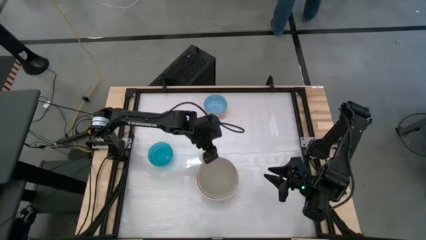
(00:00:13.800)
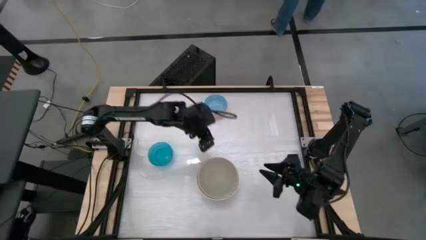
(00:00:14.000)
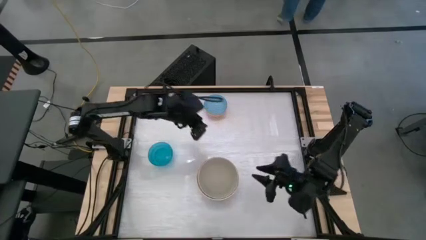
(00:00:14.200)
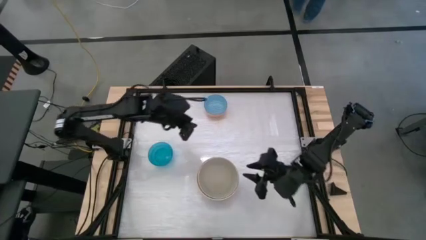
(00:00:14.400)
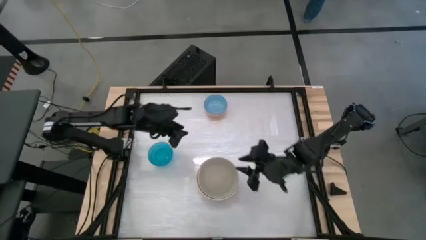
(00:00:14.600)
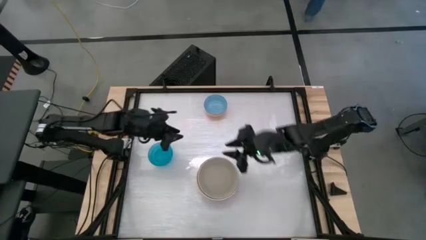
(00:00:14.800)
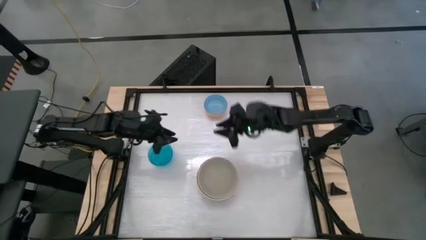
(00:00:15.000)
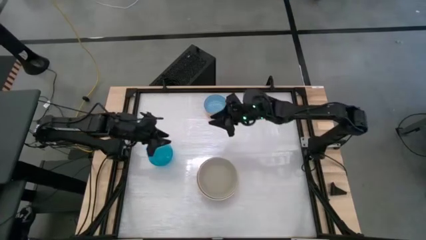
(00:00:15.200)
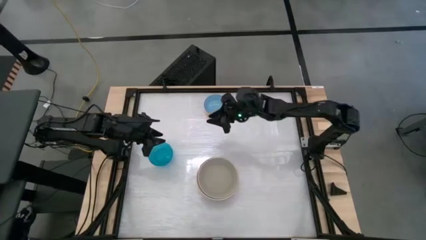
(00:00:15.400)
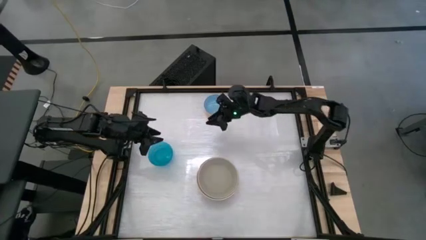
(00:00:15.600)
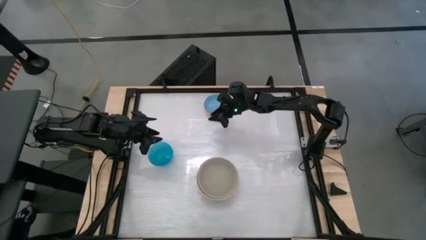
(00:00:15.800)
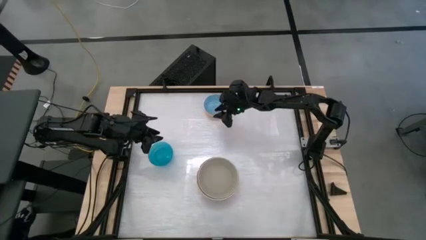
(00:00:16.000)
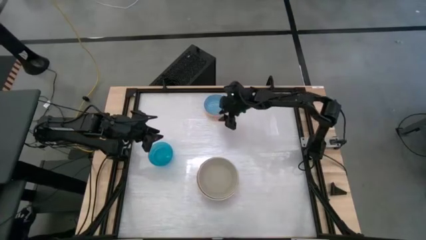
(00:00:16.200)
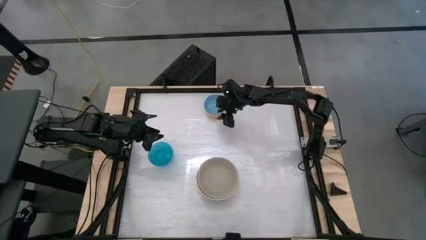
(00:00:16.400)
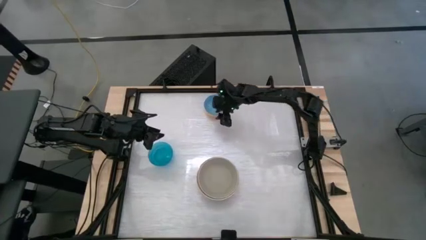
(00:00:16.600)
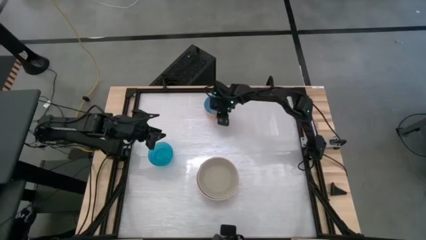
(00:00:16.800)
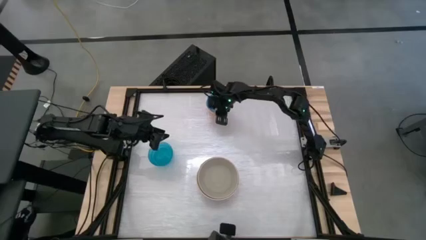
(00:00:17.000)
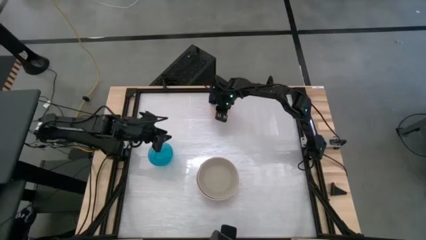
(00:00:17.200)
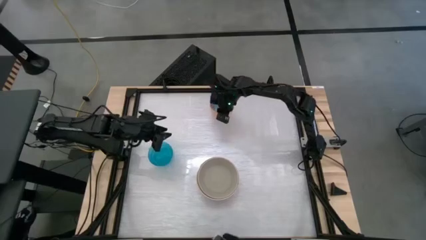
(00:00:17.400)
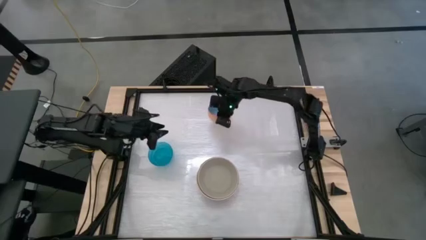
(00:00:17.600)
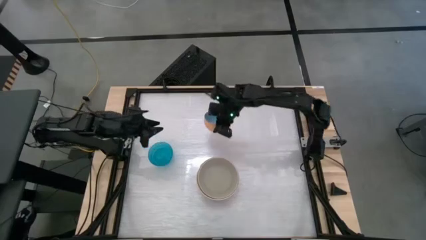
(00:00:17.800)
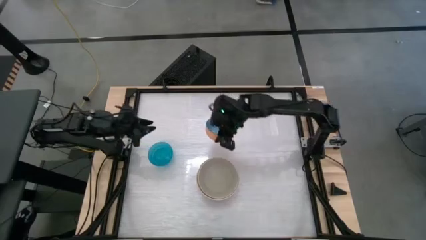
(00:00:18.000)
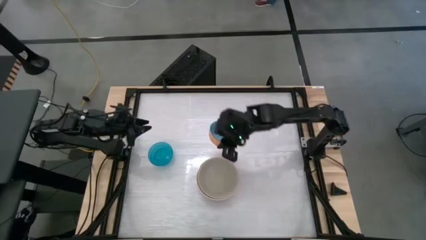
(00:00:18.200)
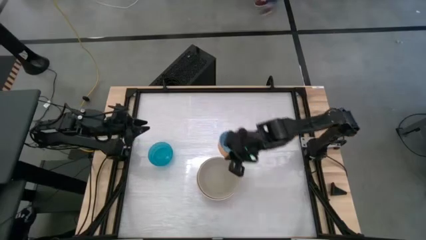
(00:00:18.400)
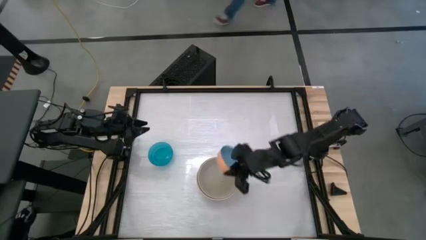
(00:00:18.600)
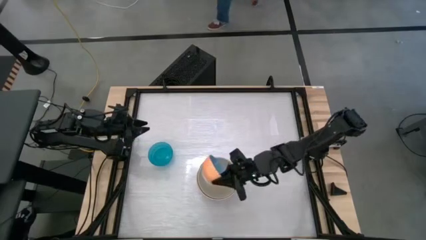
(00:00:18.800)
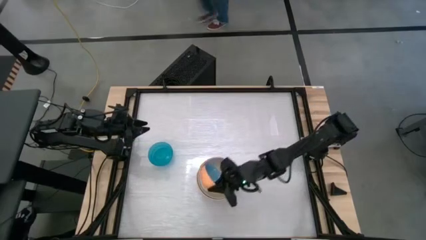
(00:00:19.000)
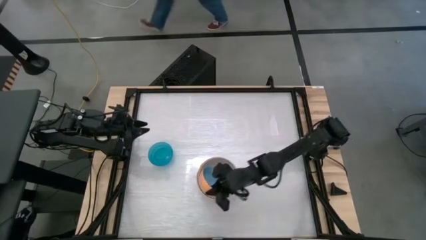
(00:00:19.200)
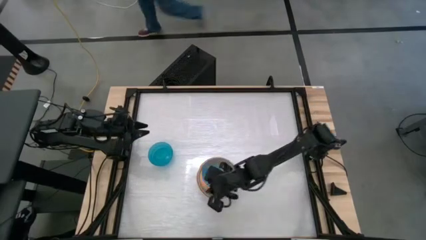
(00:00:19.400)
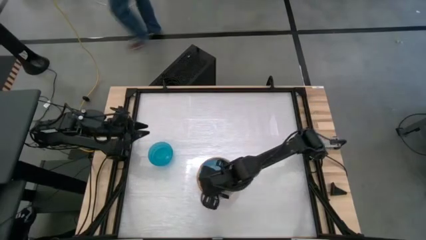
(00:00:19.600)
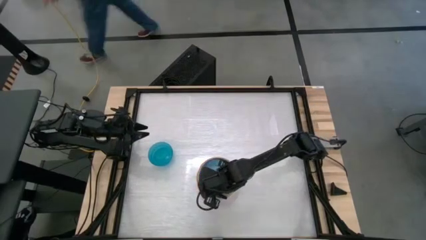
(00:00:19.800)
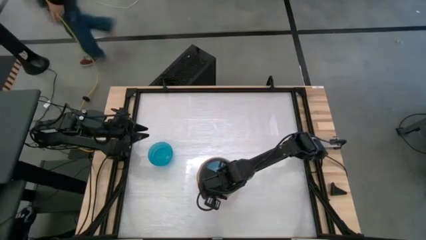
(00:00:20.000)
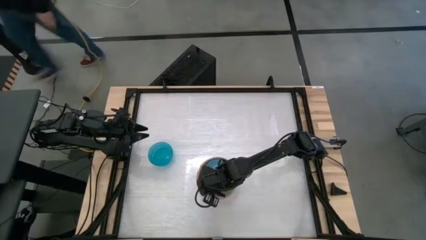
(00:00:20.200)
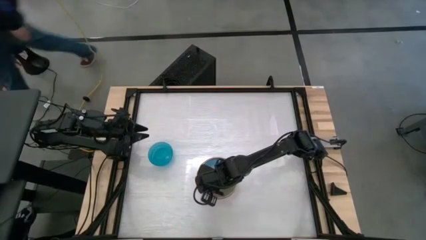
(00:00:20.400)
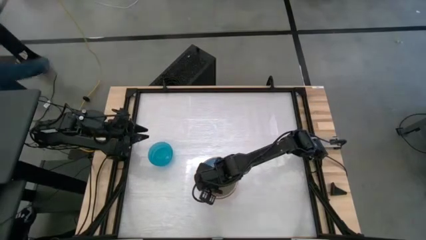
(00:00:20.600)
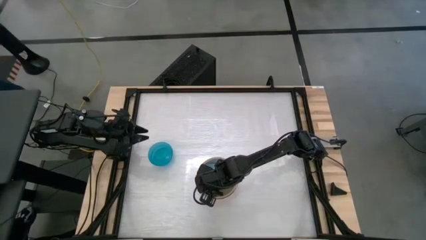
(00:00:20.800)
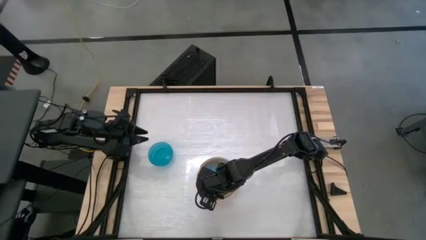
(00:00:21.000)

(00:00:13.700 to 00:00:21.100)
Stack the blue patterned bowl on top of the gray bowl

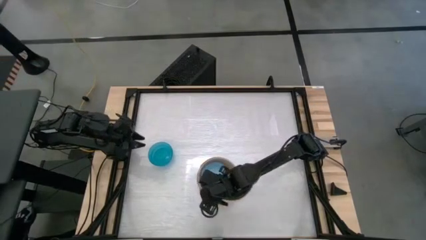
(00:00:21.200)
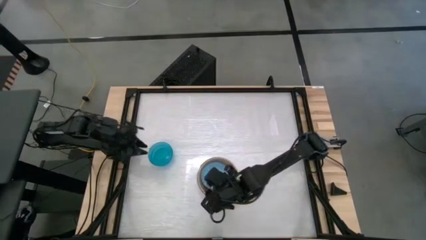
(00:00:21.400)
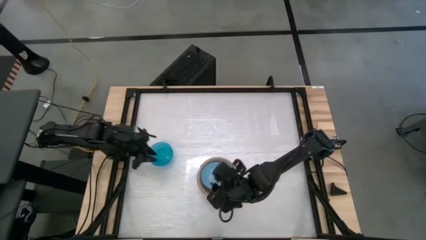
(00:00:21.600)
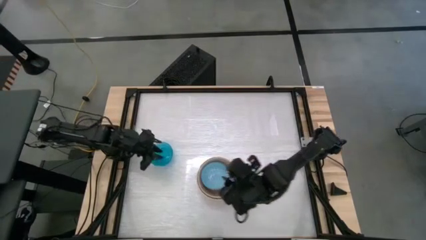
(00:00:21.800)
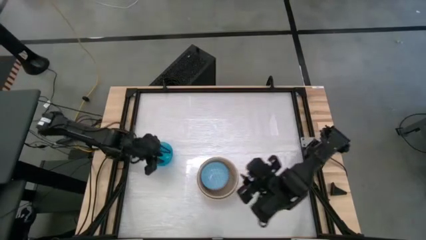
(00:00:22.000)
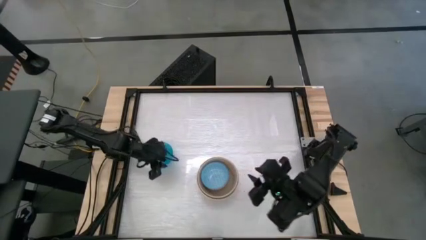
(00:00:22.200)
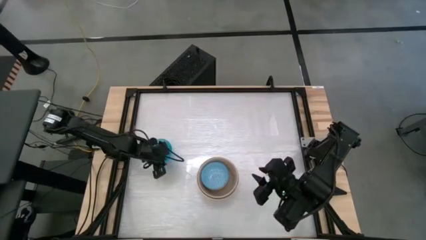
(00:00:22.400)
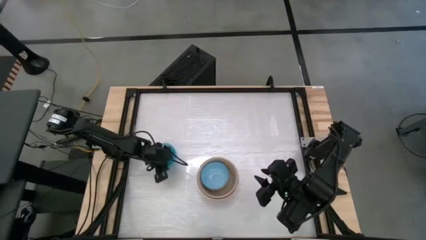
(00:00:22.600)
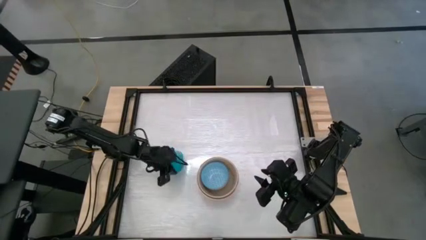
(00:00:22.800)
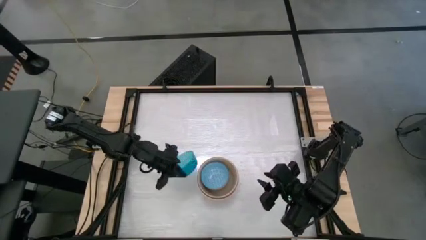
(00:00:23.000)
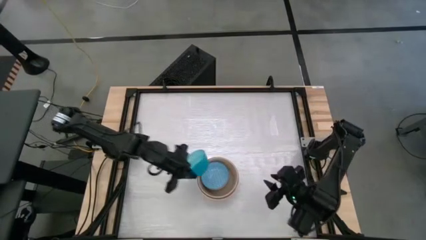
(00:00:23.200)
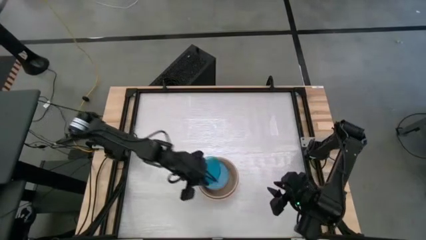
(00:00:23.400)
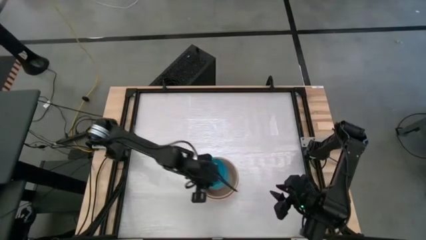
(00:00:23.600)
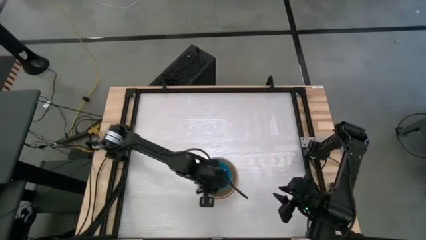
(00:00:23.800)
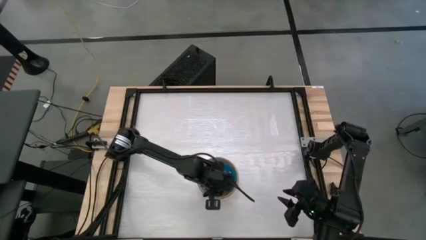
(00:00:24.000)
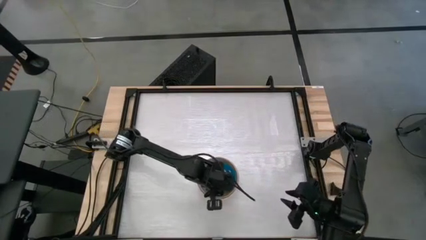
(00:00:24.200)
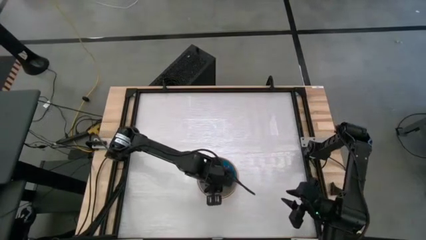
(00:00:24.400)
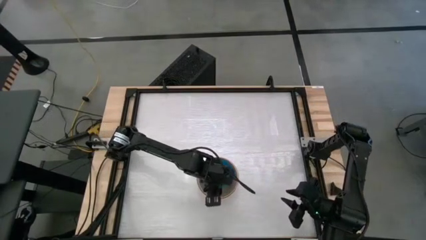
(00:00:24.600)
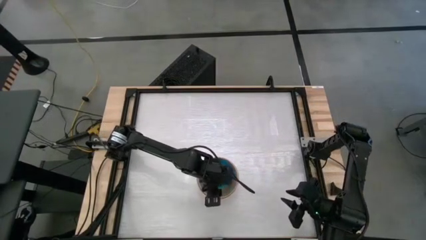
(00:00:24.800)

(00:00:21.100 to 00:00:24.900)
Stack the blue bowl on top the blue patterned bowl

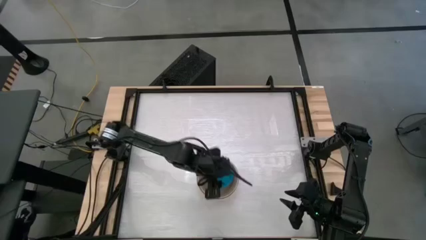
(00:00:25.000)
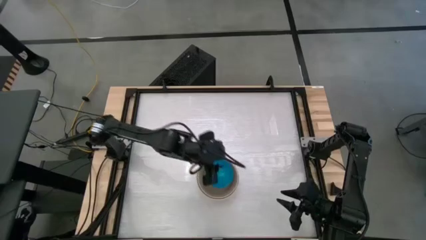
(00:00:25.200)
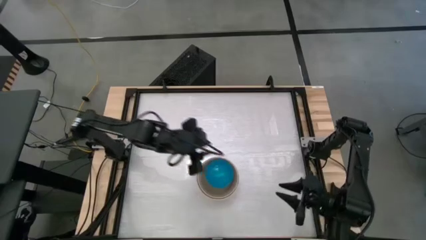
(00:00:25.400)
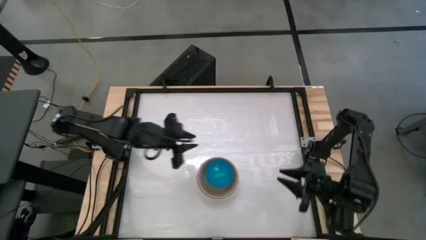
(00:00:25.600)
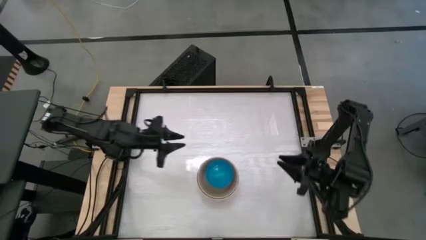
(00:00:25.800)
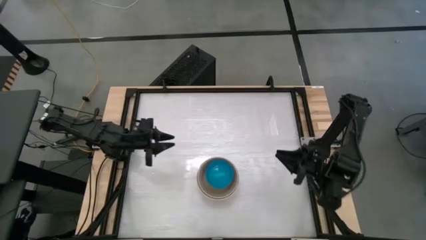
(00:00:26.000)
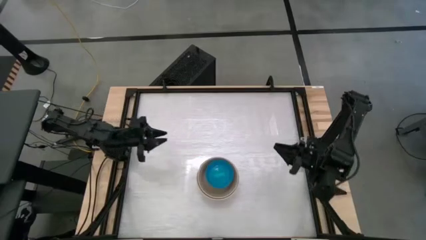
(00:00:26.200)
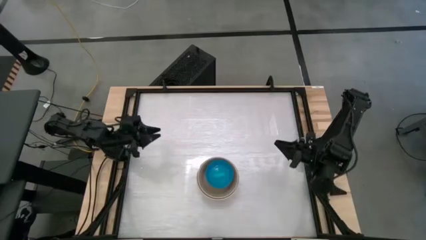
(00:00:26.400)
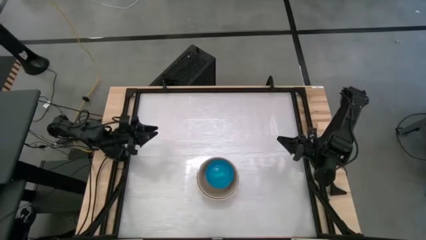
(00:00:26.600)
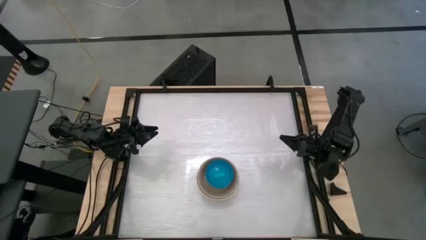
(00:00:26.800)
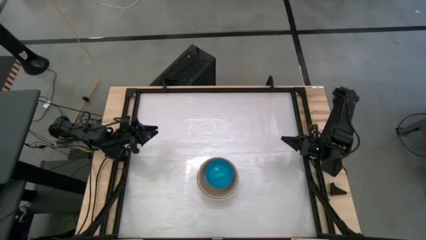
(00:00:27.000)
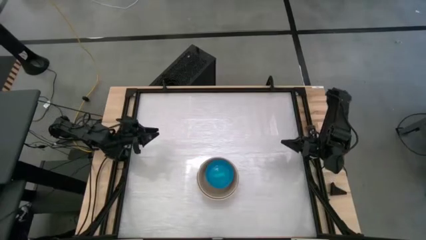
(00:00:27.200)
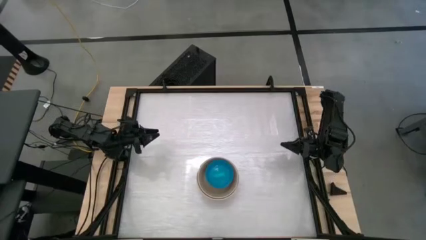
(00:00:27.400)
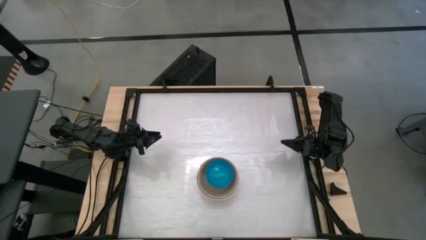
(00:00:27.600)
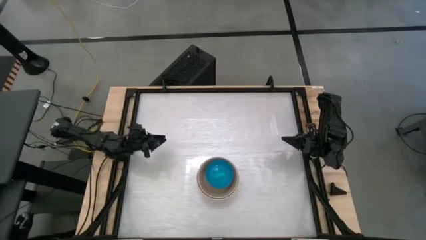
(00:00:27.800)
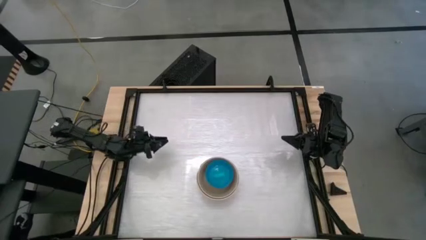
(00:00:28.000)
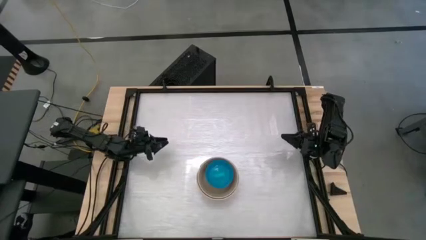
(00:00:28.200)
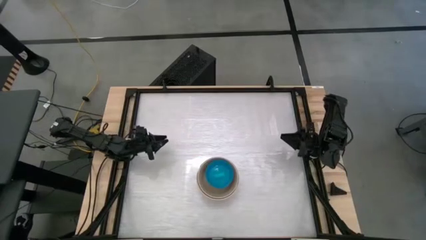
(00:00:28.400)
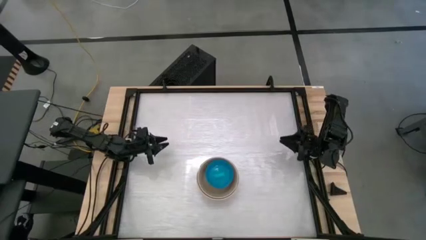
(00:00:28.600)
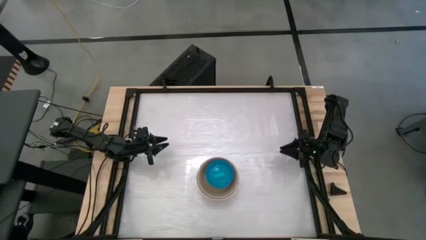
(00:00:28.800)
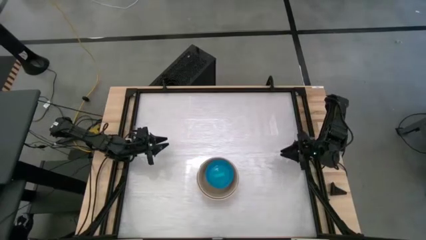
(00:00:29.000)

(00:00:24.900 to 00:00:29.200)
Return to Home Position

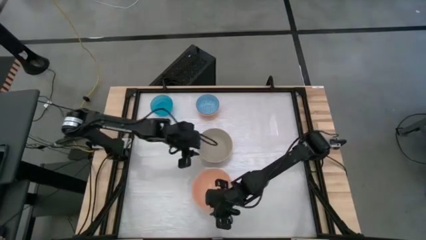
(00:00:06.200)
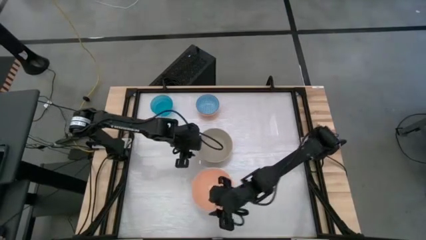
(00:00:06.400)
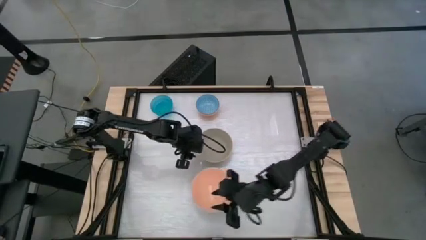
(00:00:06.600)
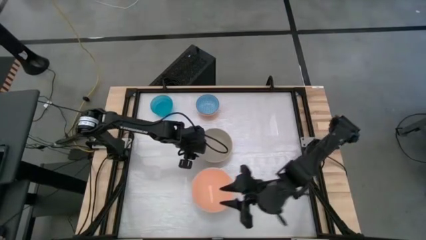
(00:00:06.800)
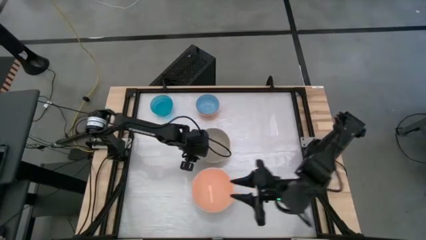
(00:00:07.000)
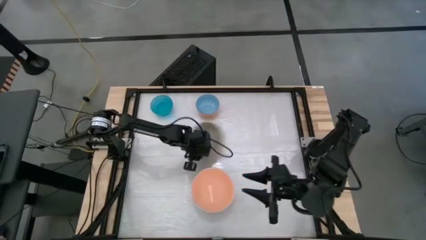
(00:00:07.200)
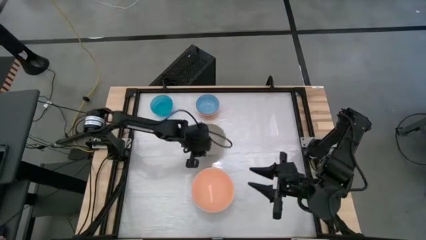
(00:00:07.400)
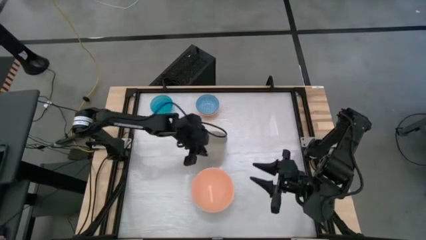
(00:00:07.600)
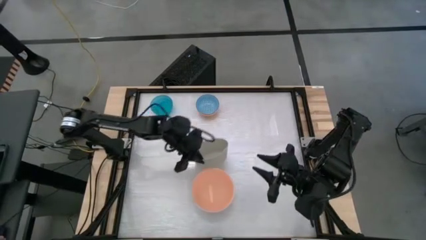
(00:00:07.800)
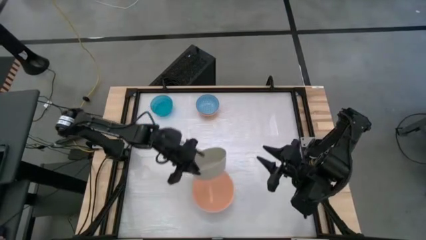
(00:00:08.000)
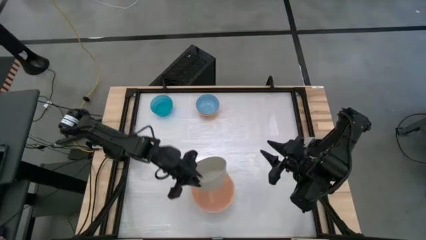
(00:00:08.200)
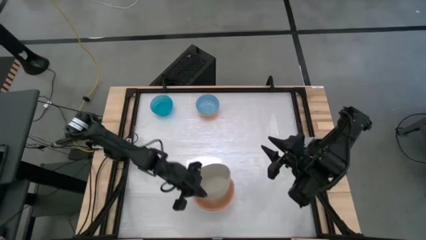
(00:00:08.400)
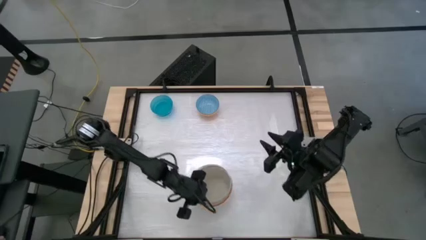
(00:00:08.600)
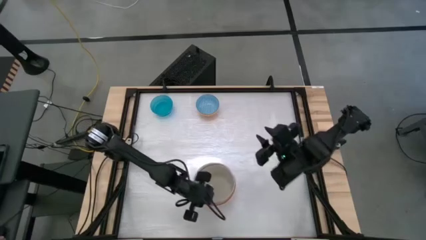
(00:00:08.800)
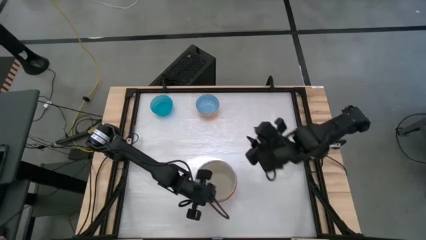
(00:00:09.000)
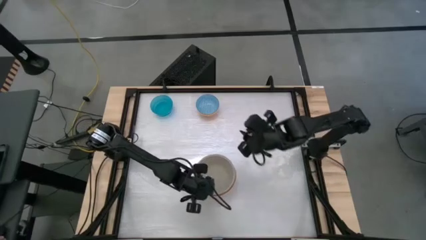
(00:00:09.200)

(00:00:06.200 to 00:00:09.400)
Stack the gray bowl on top of the light orange bowl
